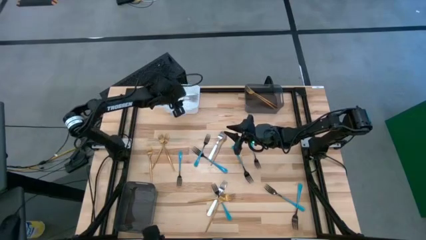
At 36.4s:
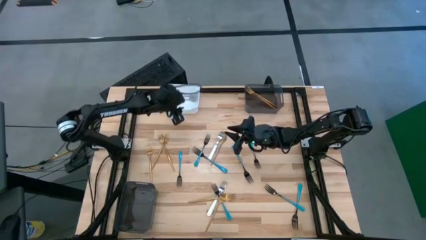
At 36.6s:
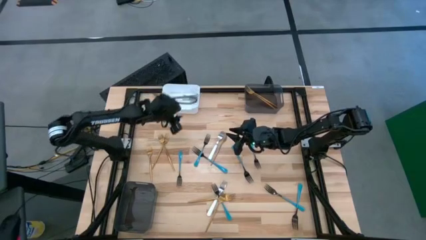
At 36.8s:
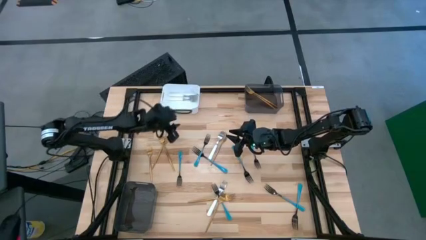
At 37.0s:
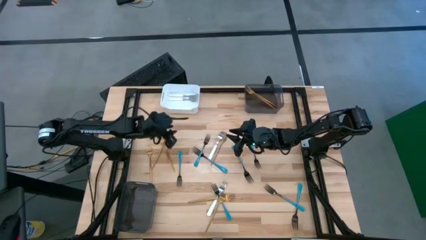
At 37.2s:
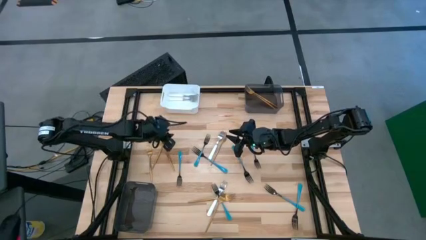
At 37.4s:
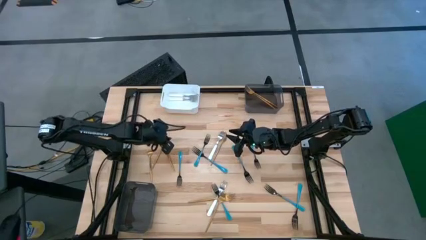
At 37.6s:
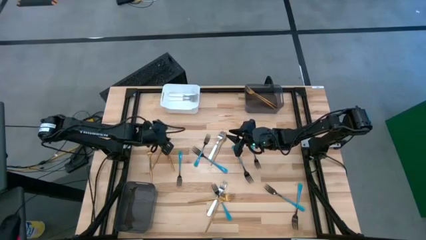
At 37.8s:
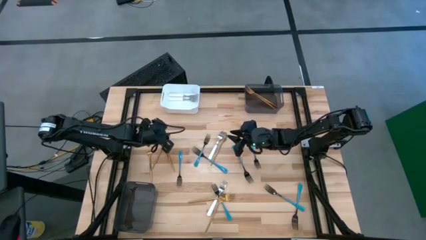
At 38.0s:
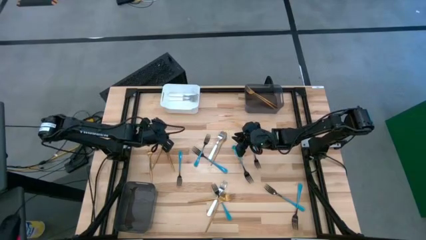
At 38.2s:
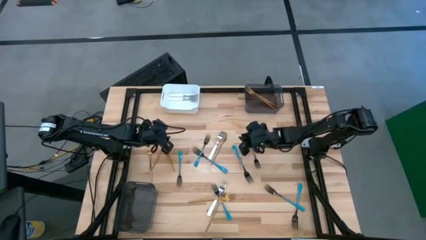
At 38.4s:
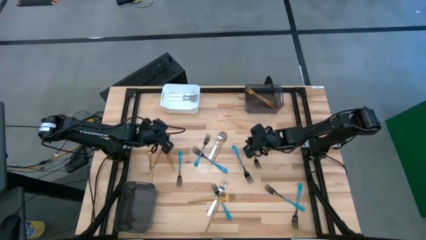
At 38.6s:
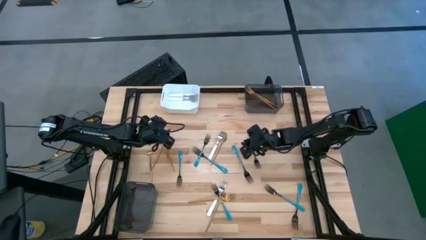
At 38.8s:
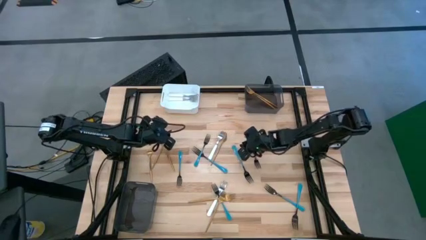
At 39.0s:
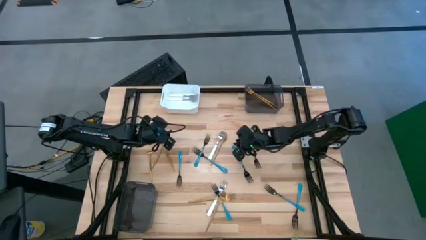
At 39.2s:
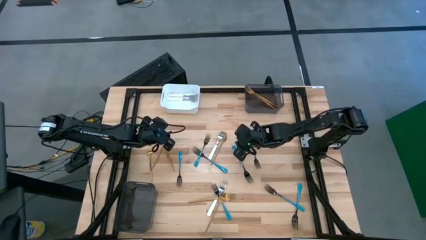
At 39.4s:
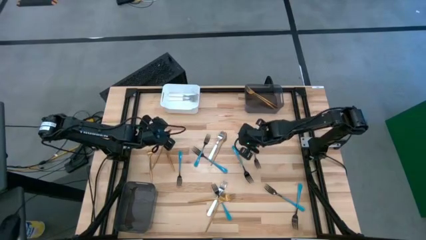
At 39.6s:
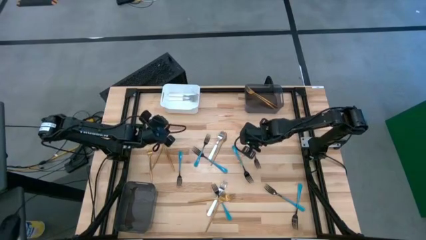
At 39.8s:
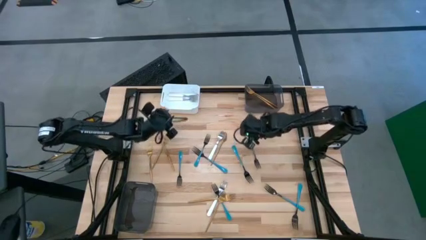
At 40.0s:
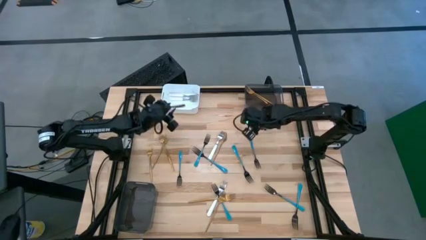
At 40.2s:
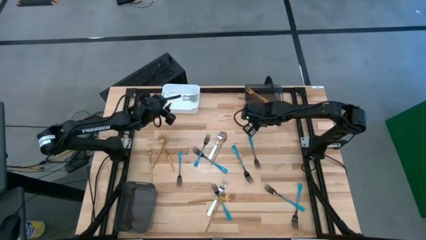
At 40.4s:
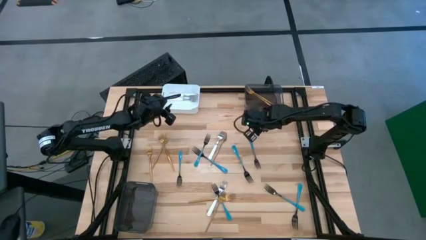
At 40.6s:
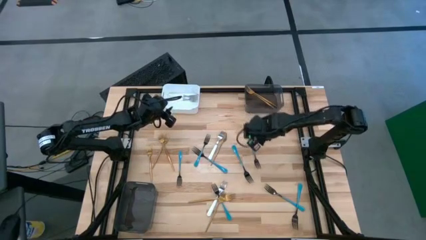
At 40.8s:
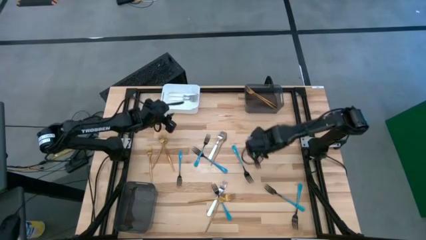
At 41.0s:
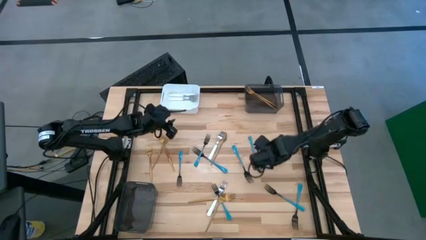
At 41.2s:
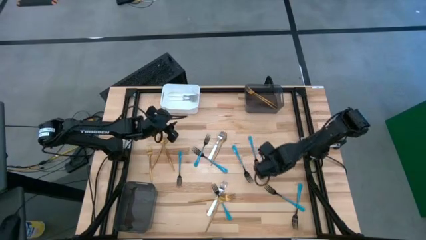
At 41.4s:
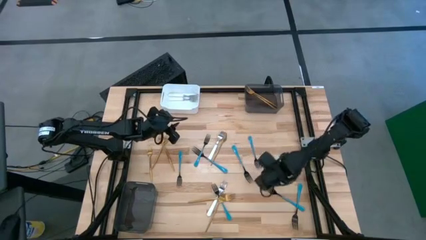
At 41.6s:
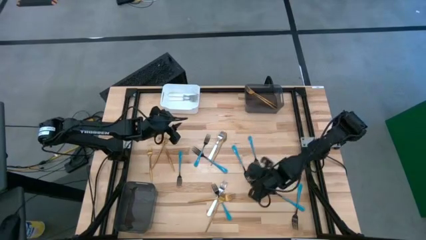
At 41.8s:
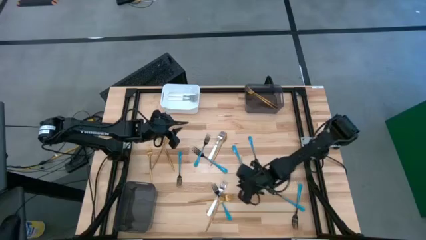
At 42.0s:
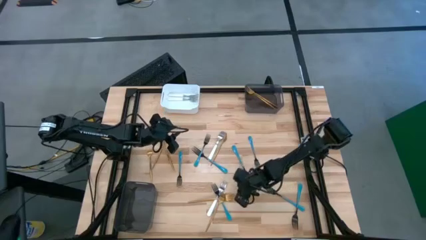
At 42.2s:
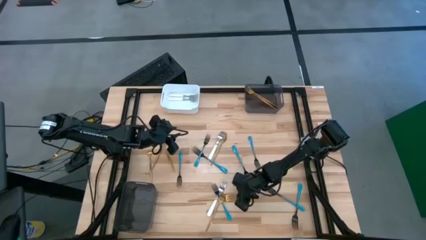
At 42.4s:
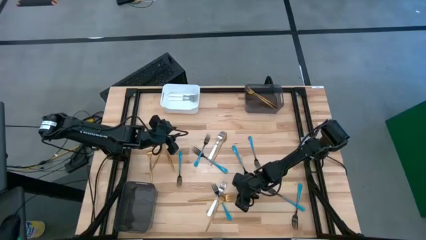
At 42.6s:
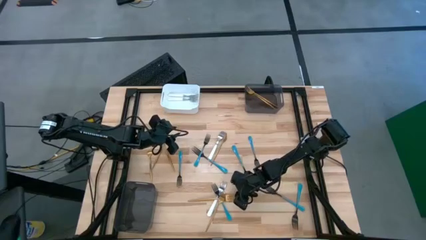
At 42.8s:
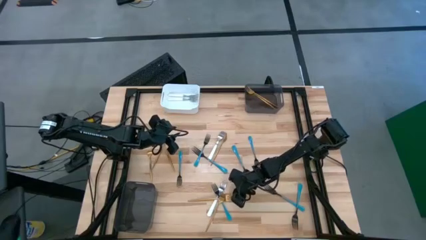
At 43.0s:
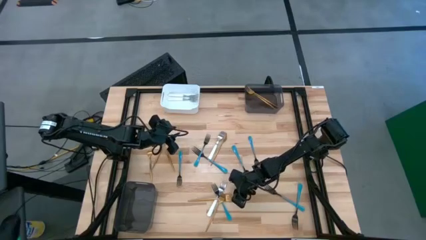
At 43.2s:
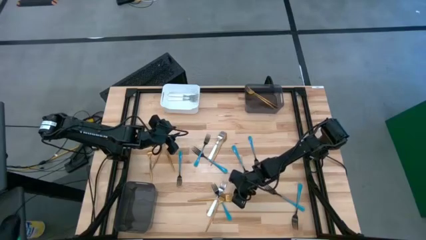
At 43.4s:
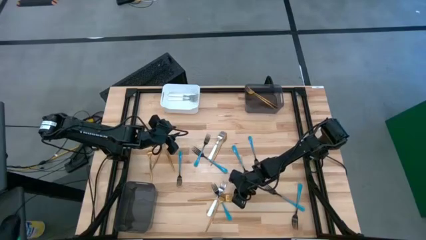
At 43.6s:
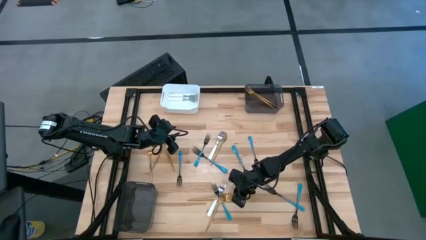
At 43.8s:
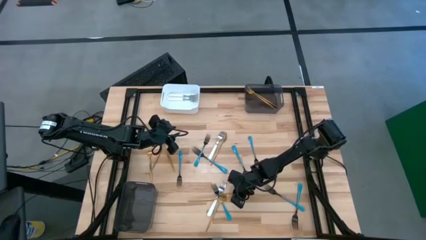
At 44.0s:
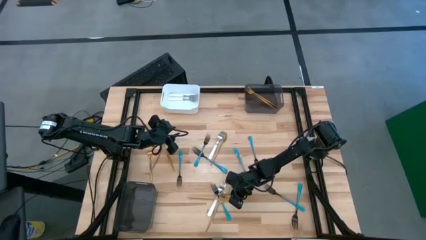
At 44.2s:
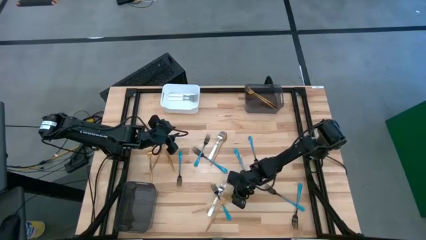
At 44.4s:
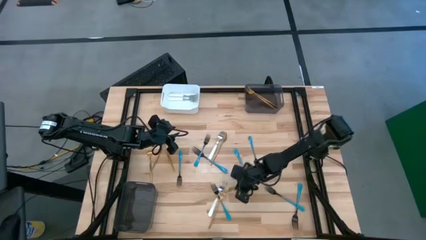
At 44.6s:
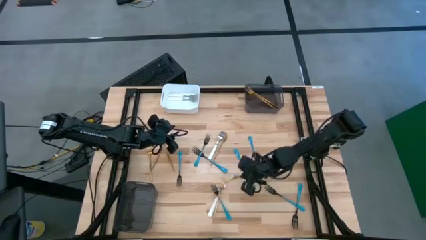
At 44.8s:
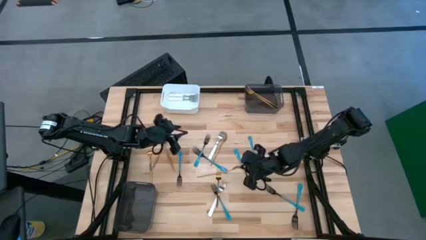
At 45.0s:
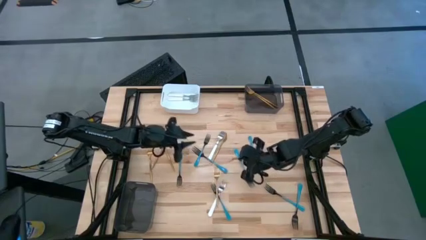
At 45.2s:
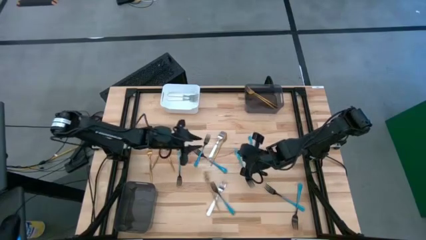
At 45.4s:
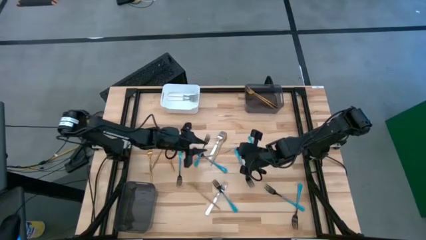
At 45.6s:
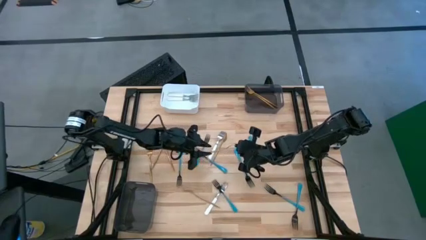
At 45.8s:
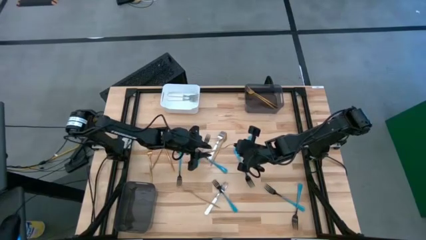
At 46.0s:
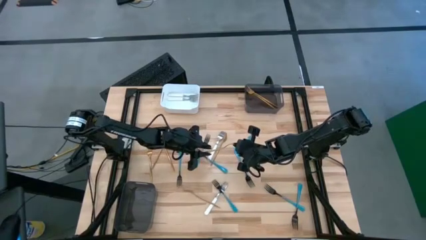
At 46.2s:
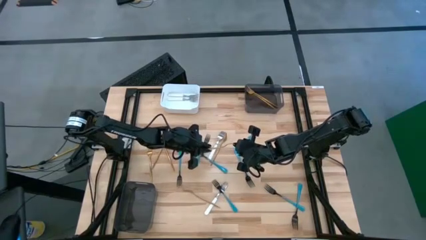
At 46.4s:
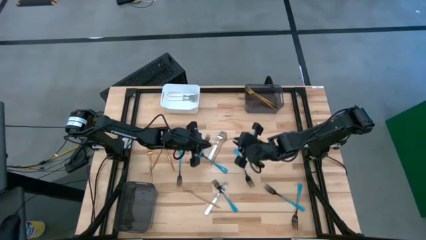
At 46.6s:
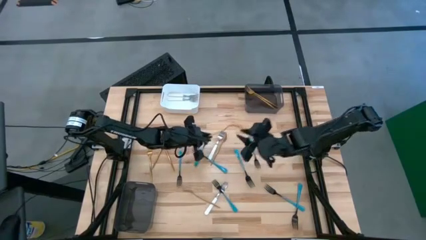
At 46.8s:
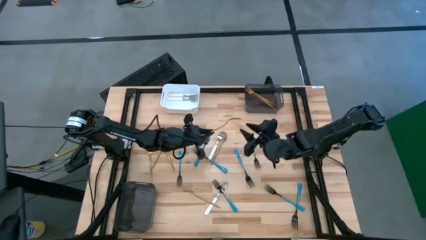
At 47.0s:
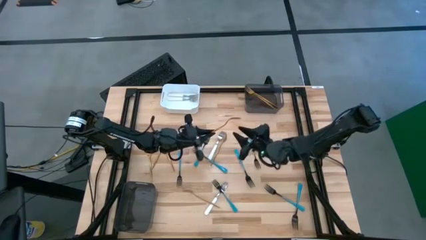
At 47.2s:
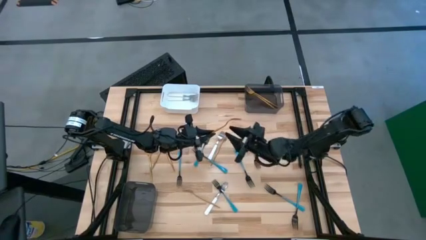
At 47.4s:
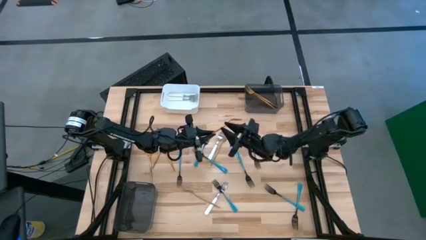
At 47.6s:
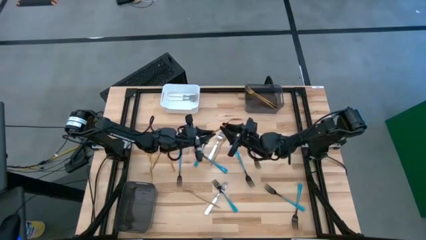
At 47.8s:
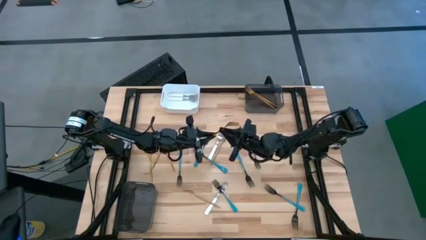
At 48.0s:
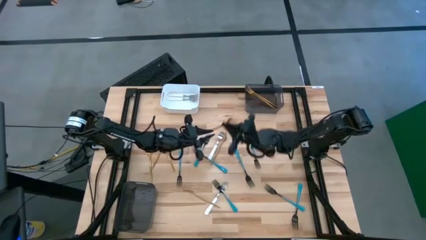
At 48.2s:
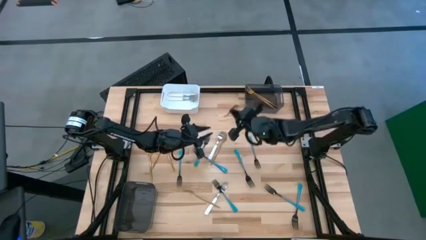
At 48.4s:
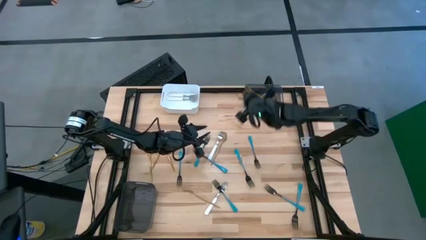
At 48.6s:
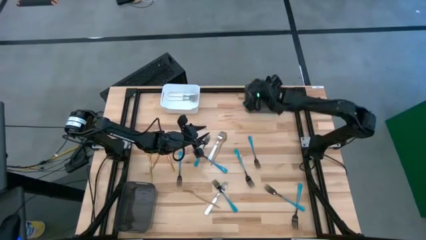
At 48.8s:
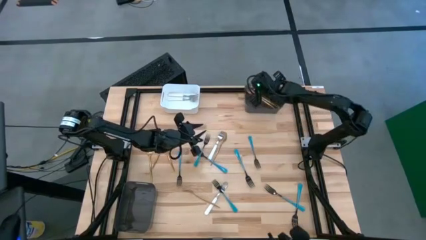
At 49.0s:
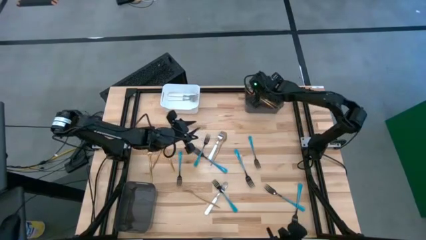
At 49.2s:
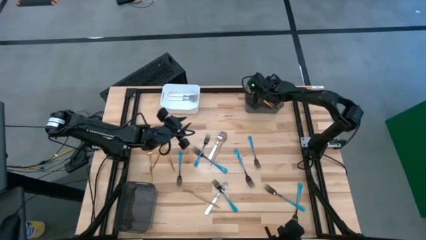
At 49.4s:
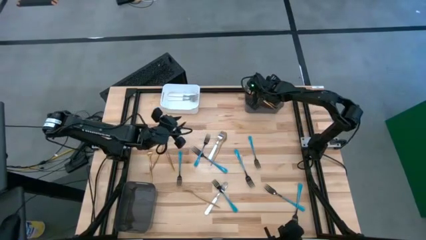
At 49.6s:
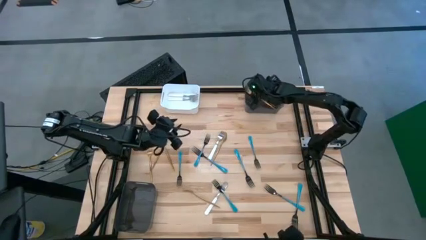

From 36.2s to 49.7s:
Task: Sort silverware by color (type)
Put the gold fork into the top black bin

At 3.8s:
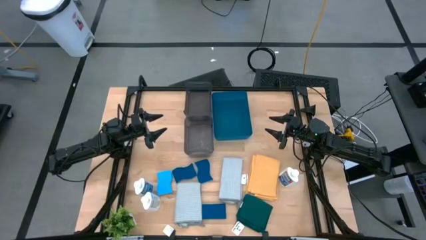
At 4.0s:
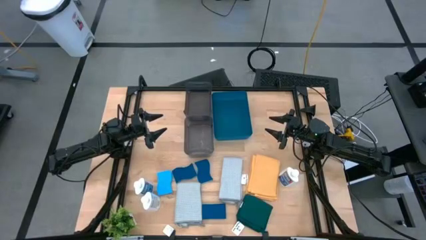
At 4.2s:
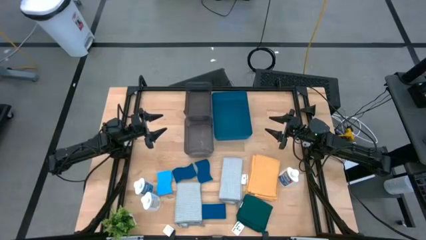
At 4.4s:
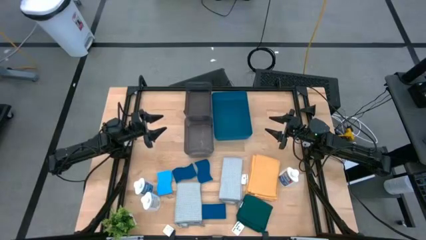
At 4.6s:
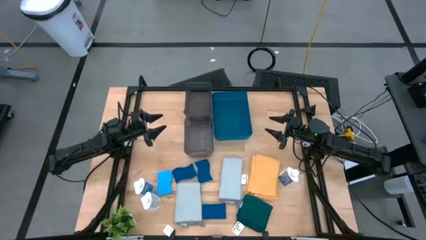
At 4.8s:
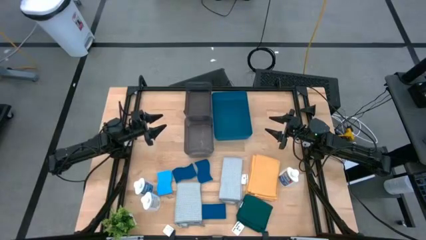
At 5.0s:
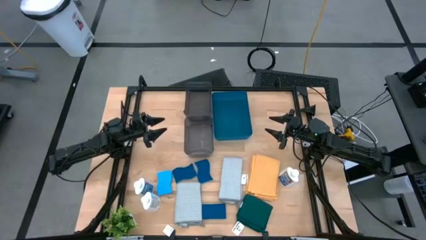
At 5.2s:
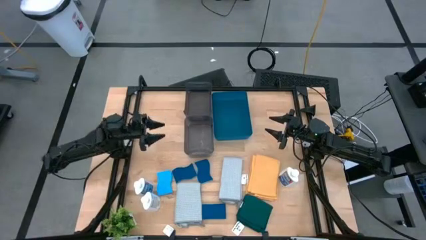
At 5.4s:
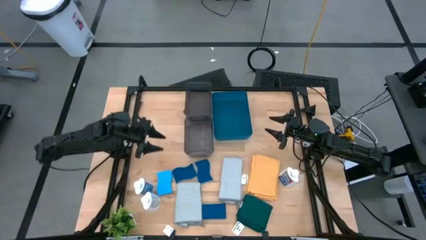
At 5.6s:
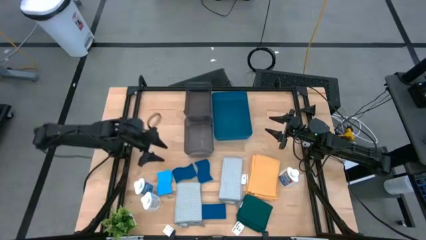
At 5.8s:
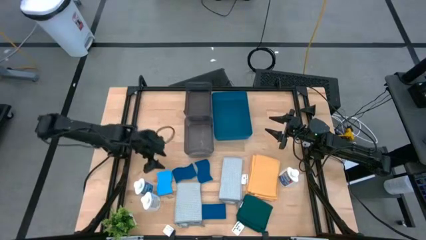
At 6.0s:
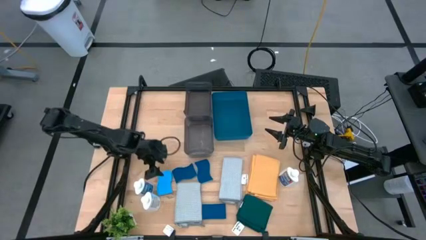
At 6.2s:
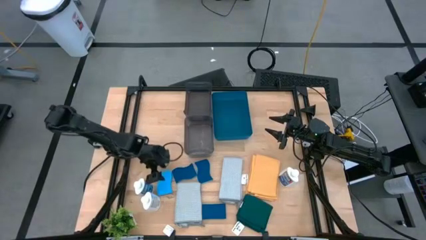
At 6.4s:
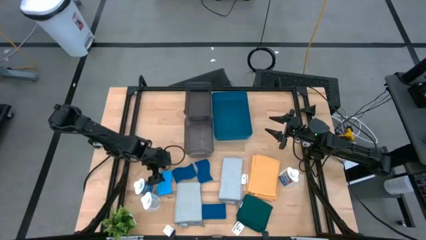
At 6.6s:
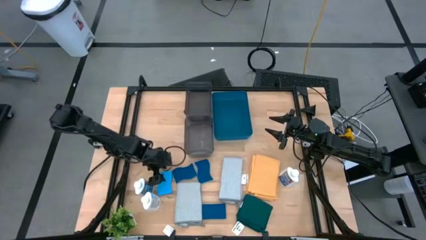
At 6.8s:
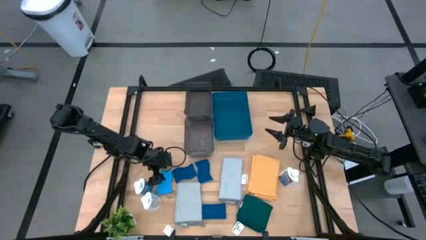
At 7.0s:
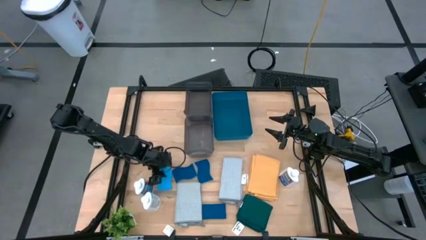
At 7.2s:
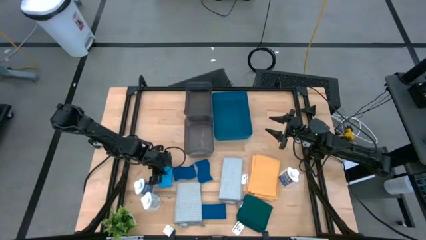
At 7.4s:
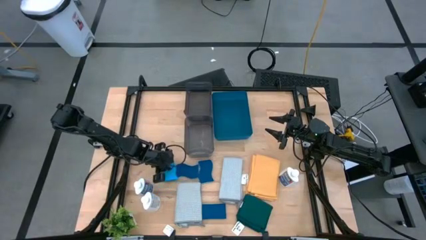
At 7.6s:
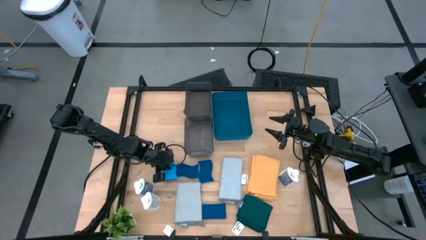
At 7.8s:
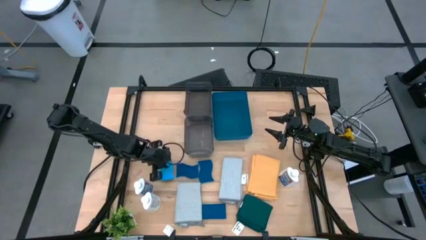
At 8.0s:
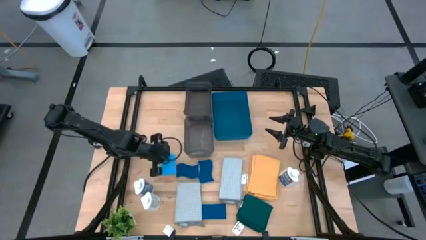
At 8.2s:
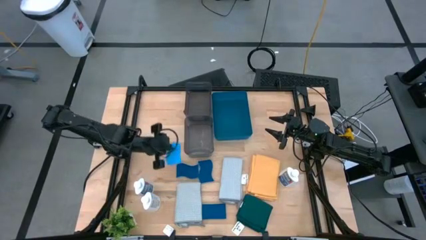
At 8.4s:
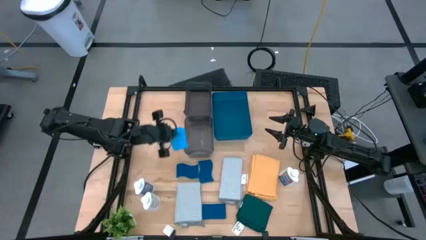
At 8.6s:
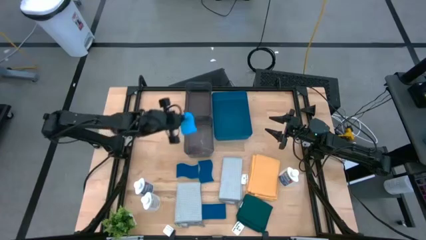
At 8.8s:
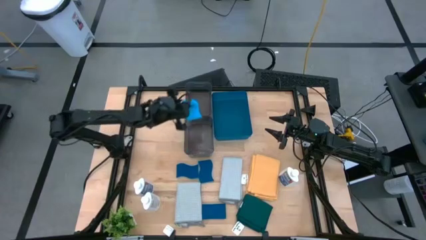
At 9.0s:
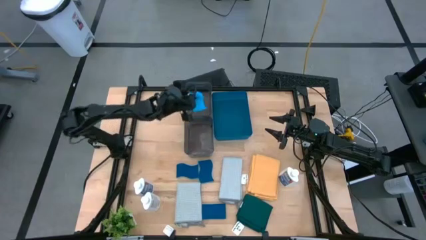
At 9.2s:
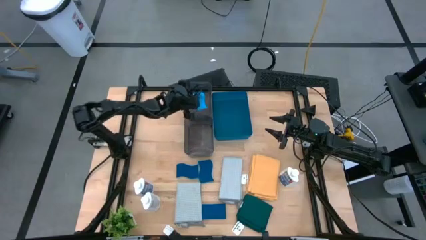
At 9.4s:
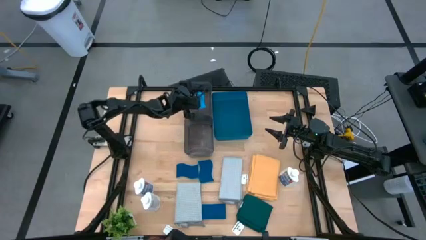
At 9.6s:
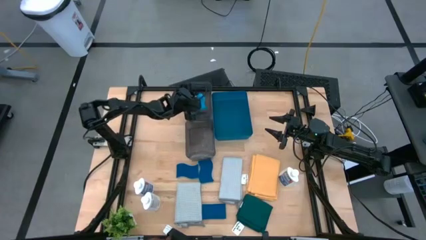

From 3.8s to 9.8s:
Task: Pick & Place Kitchen Items
Put the blue sponge into the top black bin
